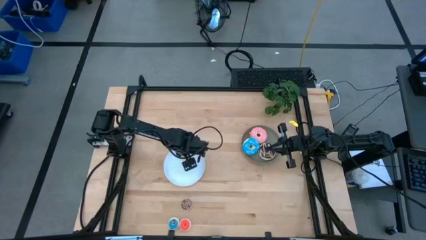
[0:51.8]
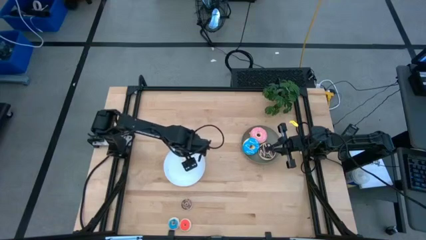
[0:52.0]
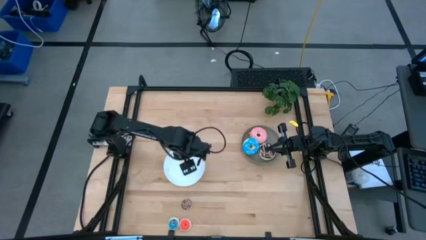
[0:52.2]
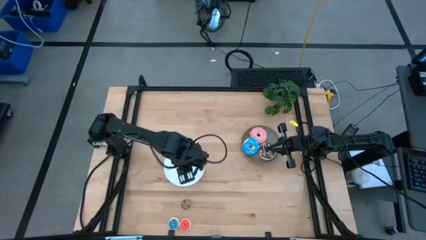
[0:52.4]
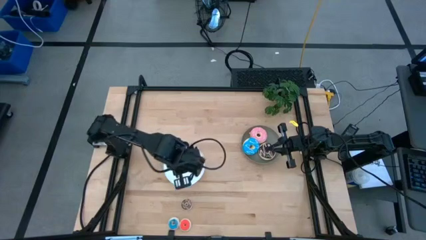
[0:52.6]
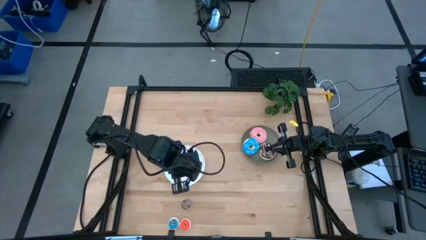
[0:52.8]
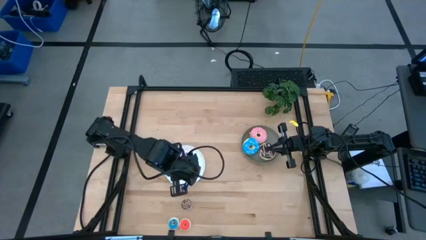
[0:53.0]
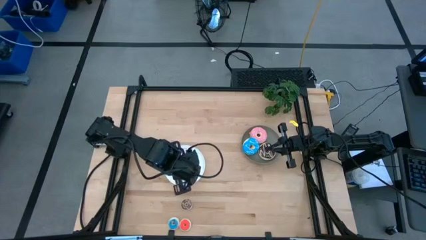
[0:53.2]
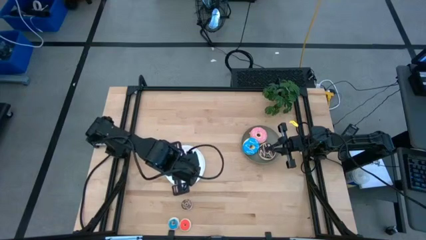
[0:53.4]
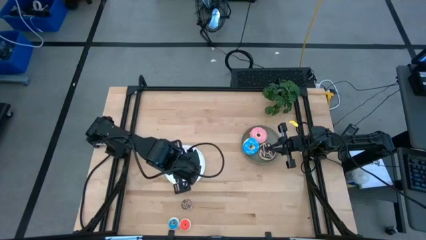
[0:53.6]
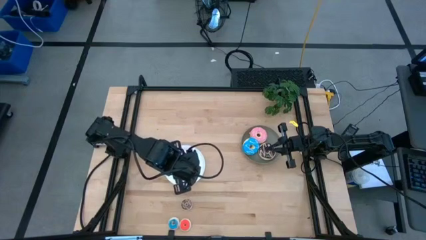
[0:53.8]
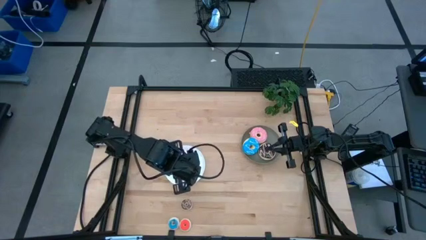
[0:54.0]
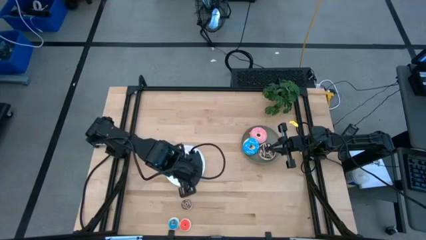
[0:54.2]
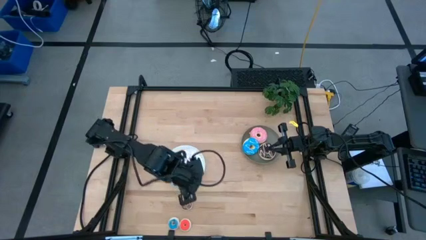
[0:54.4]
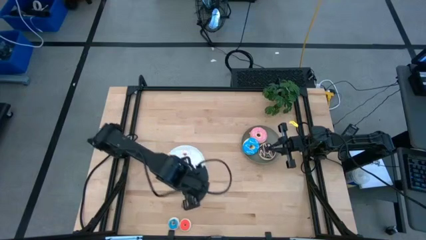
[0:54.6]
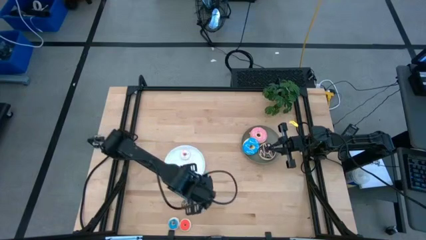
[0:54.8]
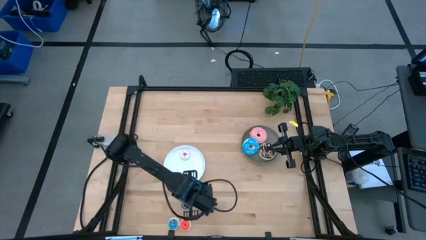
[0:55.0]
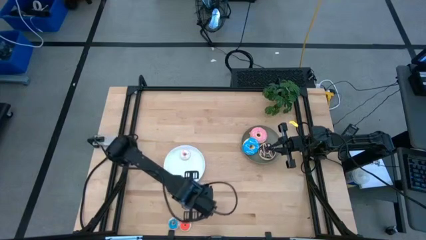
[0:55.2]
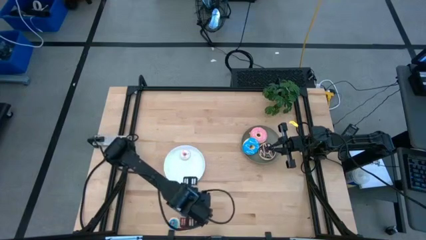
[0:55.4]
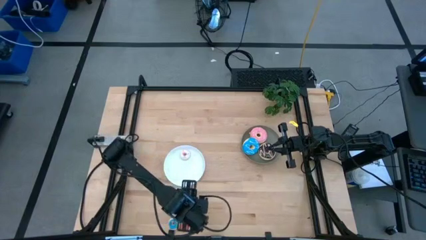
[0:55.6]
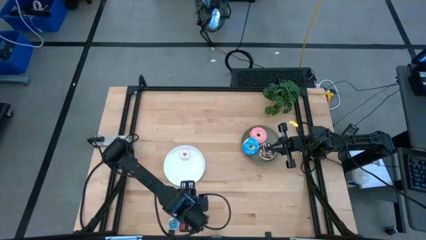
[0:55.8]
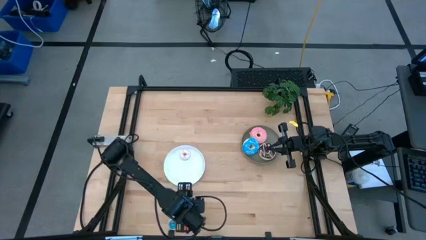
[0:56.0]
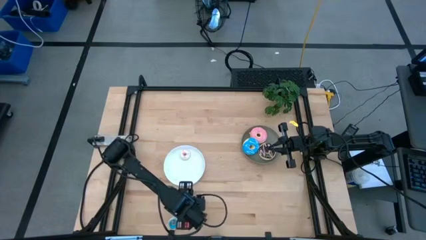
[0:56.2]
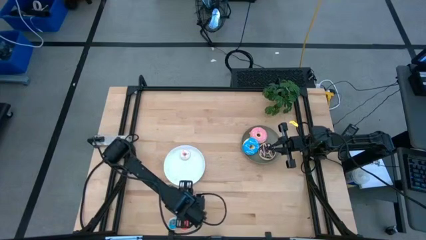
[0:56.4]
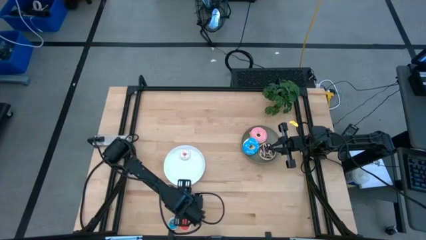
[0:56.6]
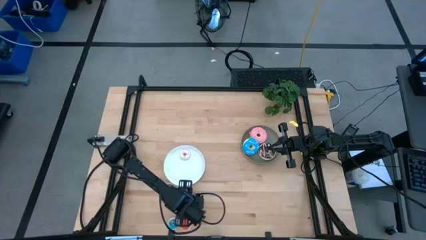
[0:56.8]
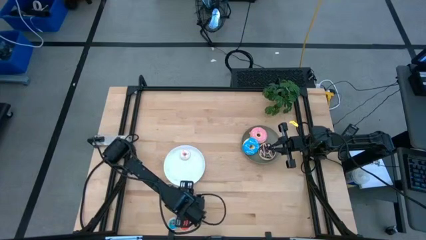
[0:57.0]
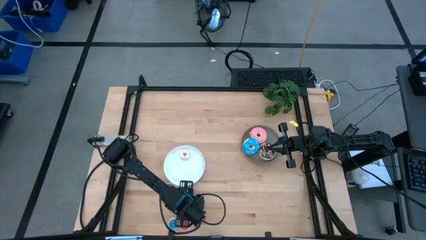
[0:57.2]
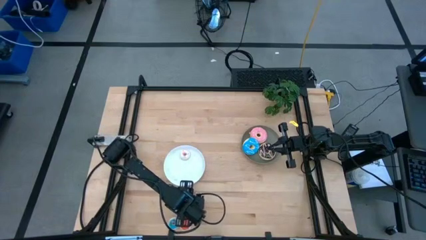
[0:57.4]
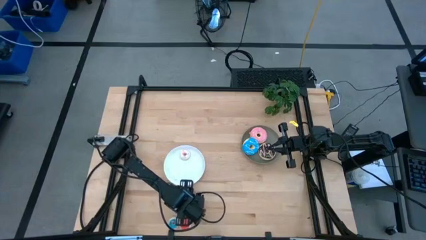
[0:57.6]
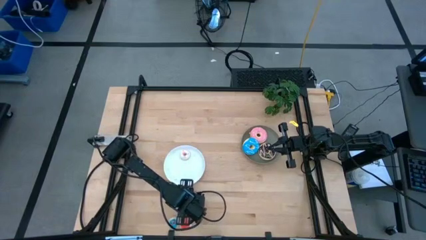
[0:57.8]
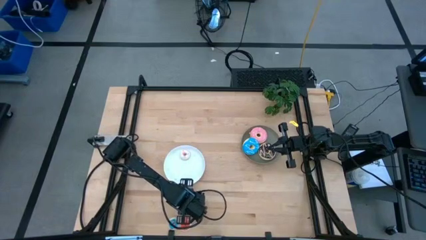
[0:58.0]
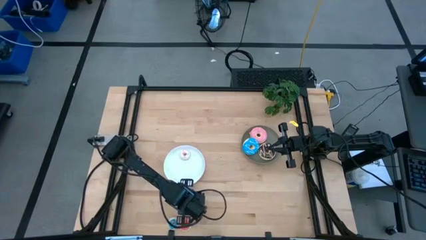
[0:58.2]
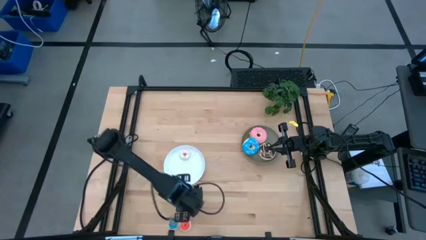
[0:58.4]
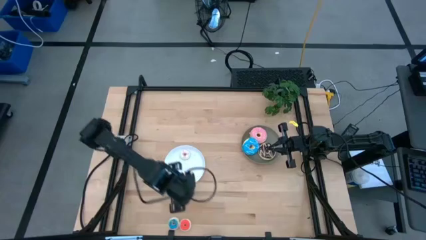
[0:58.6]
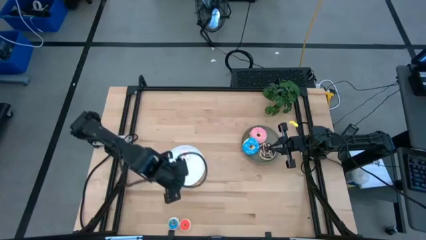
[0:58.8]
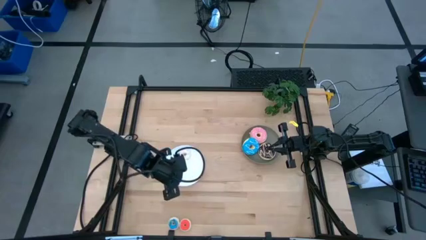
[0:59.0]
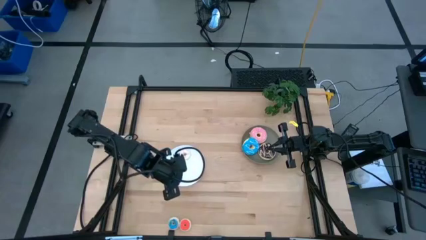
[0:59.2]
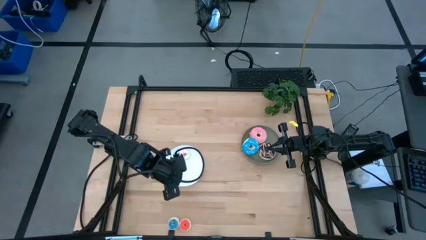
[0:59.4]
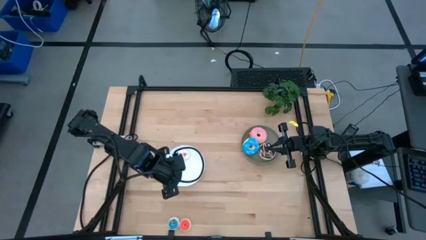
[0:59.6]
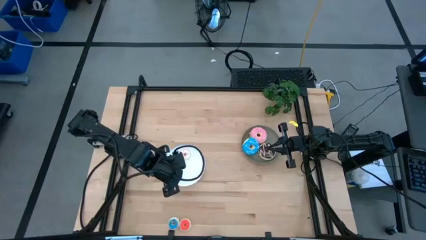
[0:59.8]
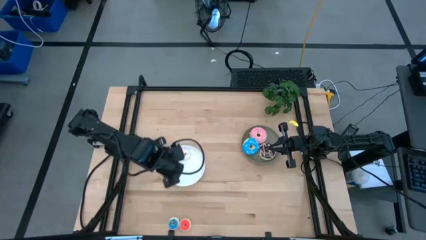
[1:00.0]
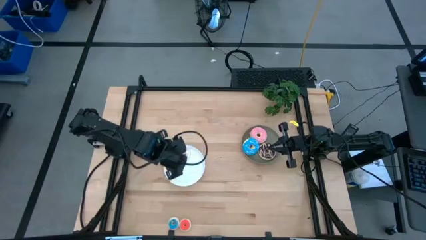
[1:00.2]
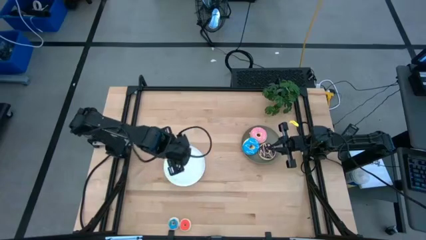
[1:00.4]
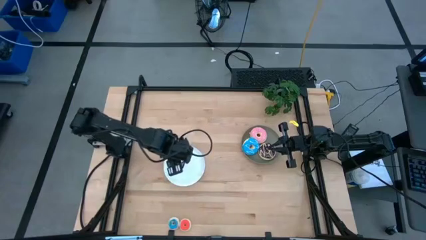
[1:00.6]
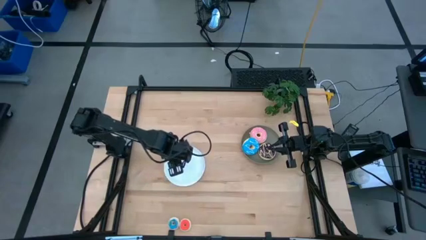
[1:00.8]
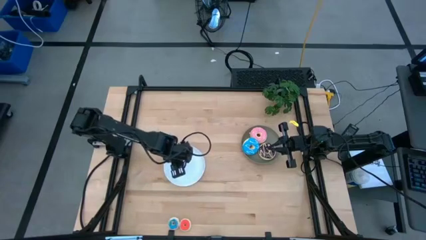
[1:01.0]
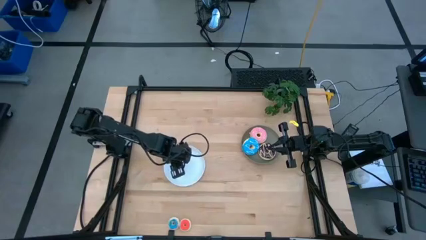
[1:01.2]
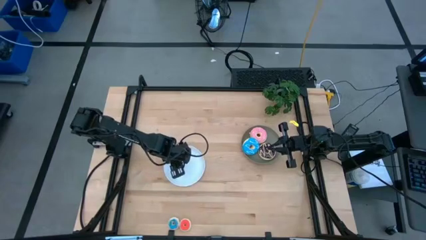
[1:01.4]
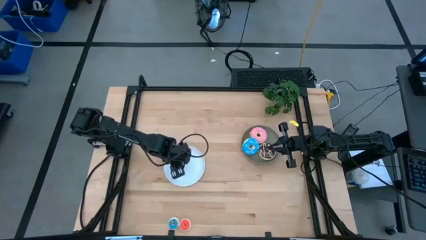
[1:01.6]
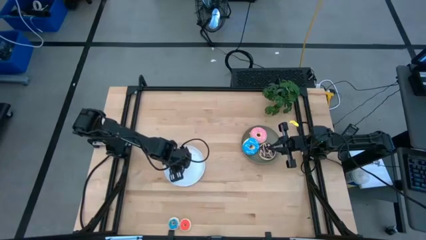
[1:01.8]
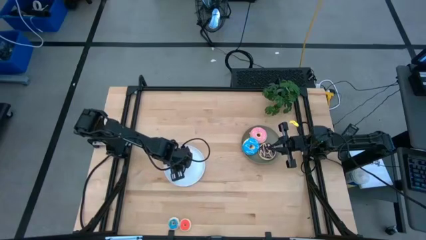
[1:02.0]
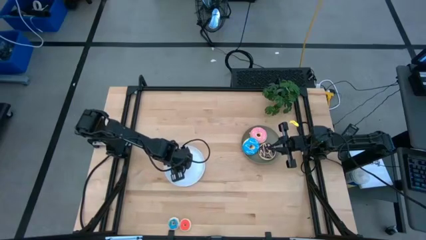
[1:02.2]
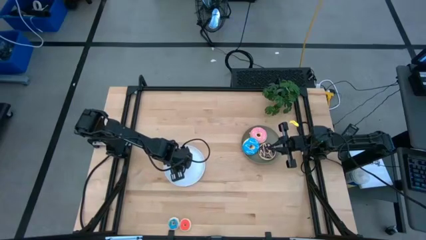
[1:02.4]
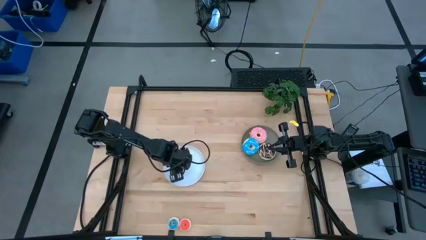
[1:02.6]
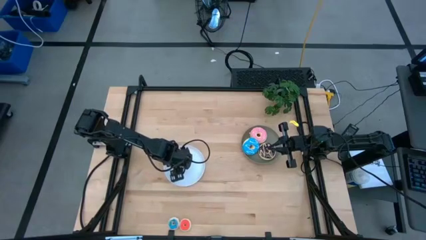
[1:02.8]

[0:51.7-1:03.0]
Task: Pick & Place donuts
Put the small brown donut on the white plate

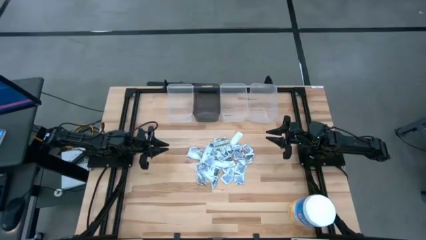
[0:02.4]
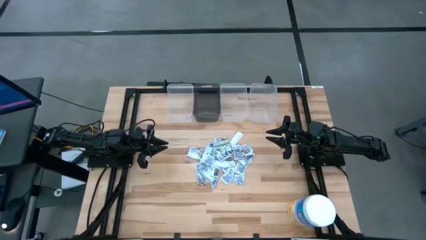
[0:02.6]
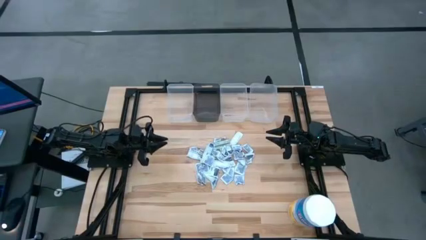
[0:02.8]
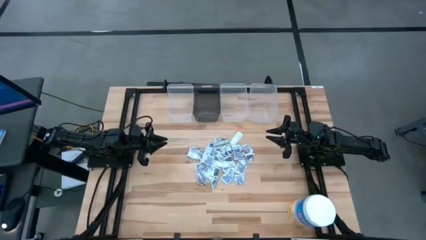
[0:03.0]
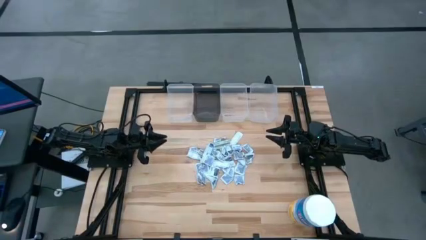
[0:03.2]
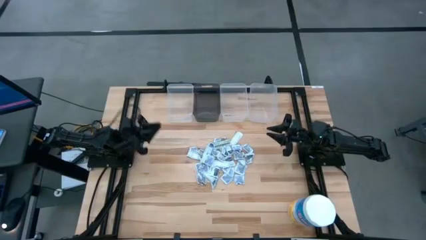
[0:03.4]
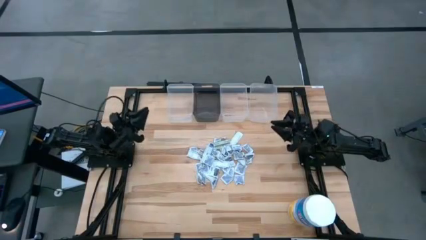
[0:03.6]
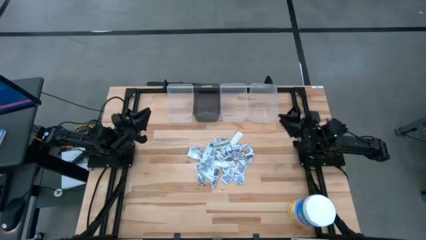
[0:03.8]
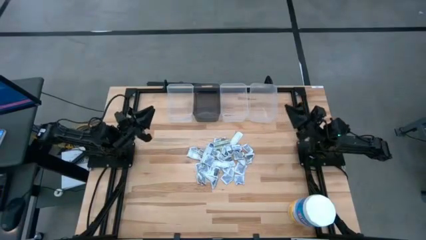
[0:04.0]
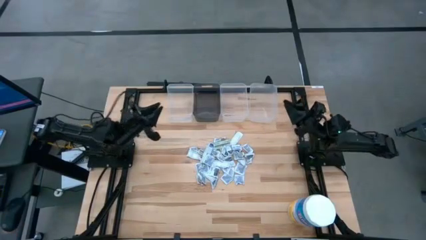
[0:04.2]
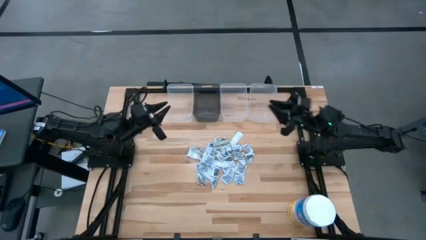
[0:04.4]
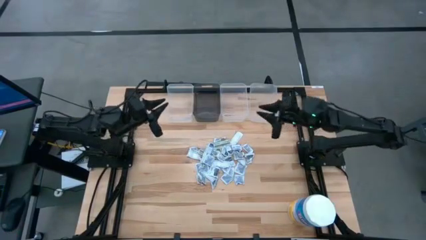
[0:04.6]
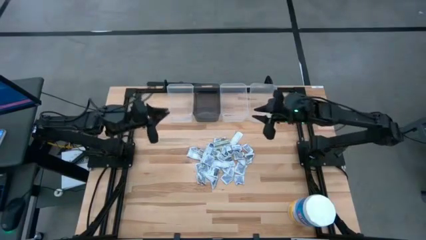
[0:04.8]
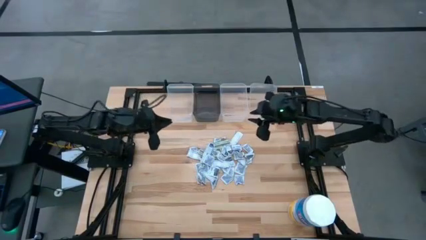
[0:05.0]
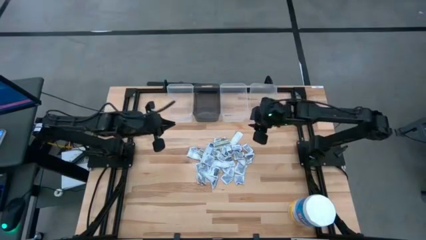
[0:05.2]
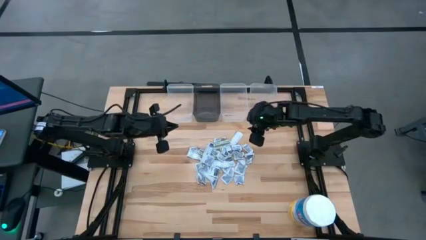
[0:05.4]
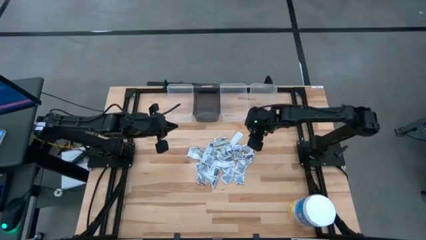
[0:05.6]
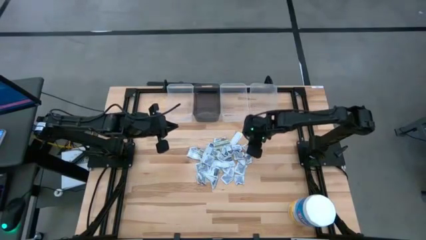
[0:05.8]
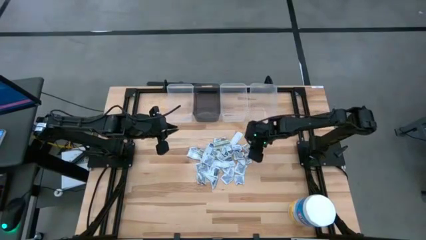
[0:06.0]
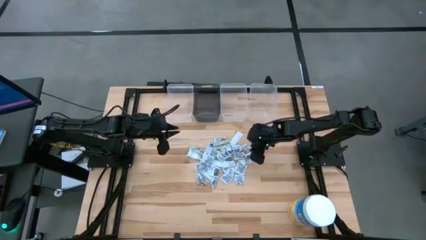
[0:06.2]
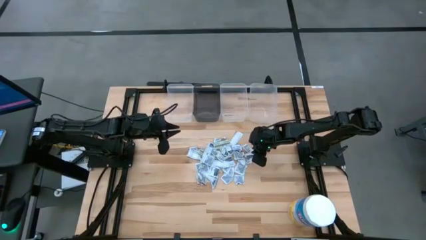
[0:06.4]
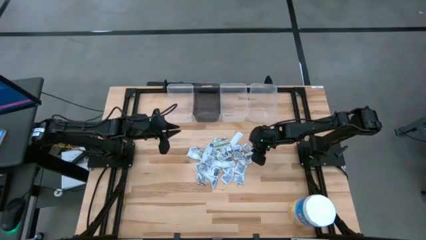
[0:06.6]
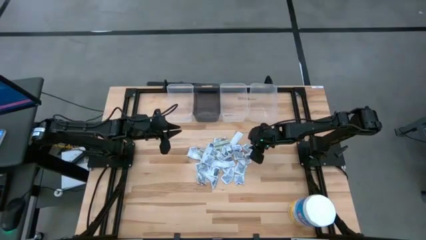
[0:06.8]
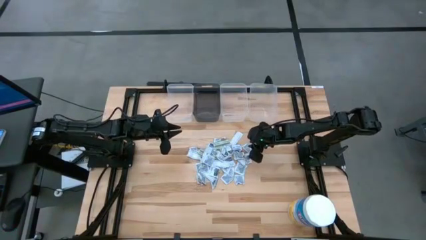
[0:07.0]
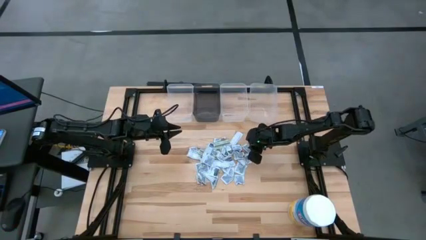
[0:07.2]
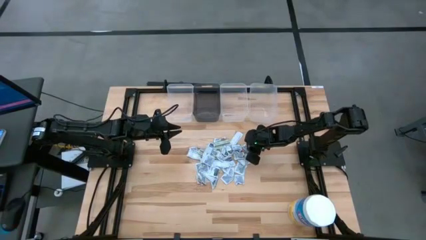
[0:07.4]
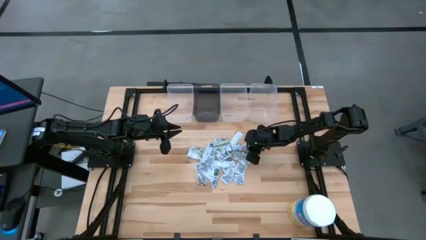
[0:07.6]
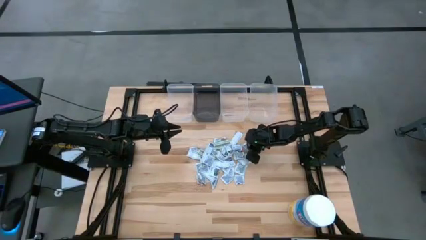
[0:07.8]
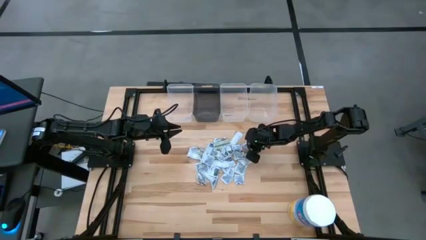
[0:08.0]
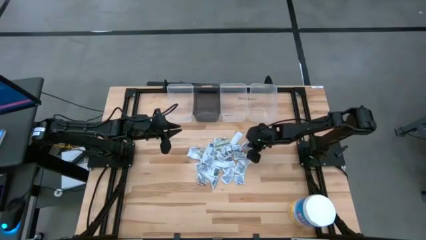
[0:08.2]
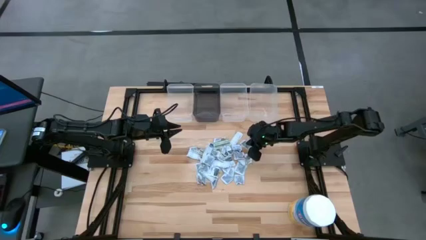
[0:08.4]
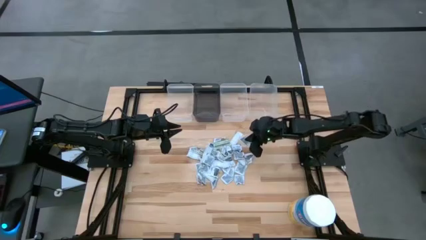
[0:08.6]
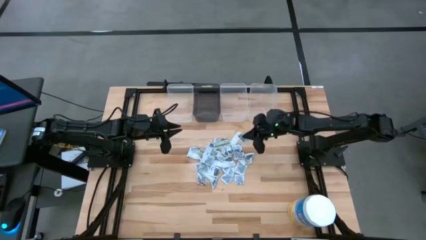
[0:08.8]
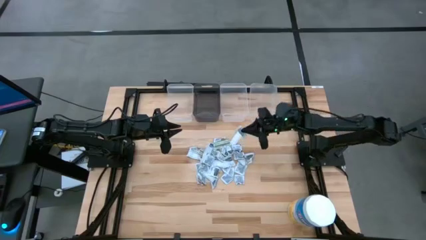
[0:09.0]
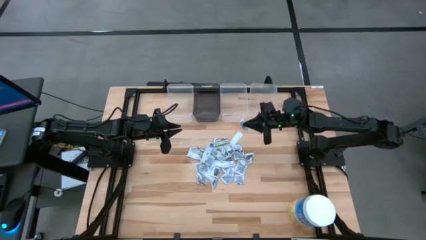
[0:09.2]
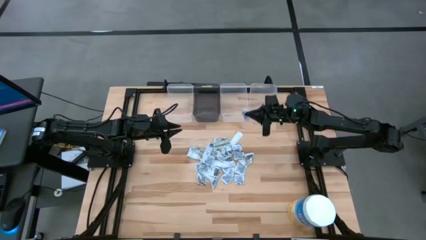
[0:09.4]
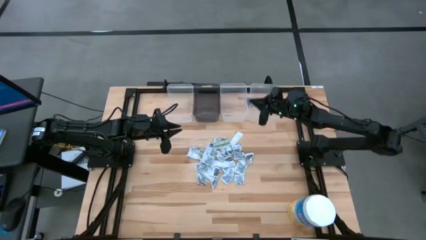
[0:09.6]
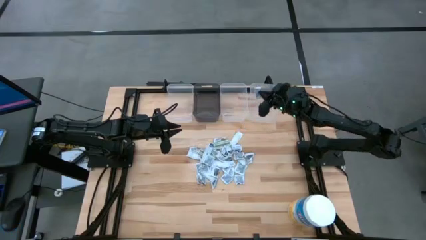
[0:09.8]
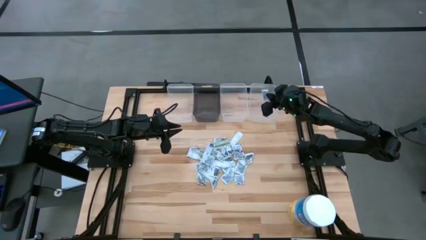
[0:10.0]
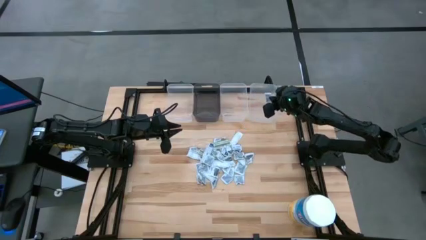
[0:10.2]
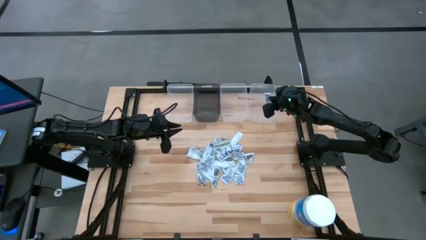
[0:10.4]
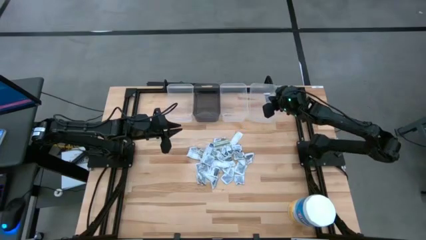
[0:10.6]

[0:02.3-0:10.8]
Task: Pick & Place First Aid Supplies
Put the ointment pack into the right transparent bin
